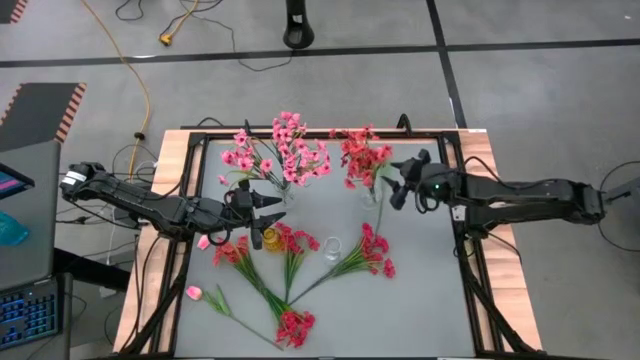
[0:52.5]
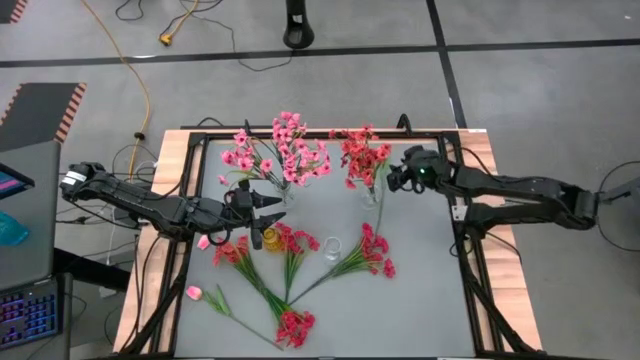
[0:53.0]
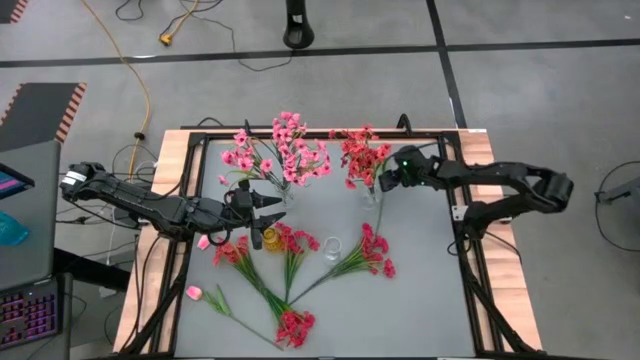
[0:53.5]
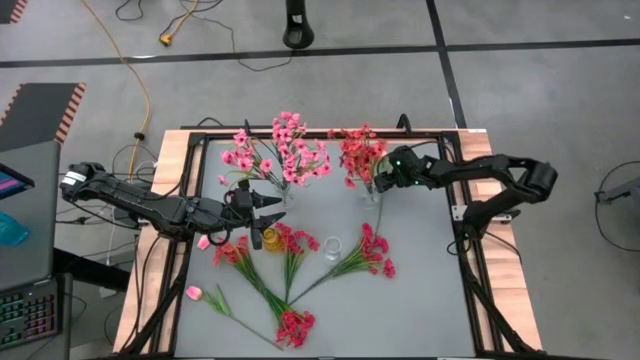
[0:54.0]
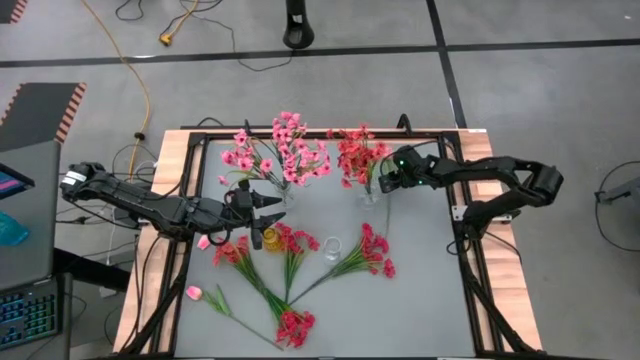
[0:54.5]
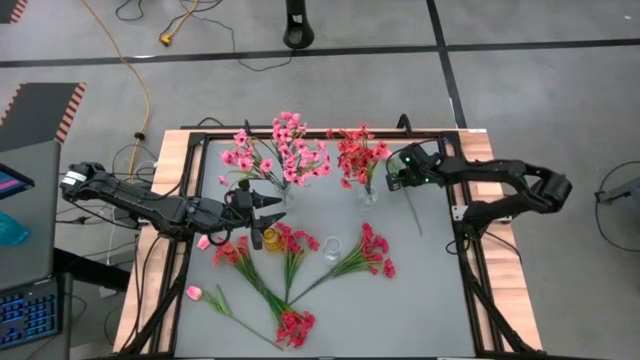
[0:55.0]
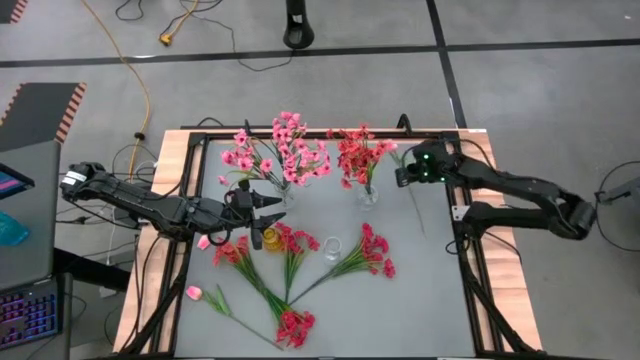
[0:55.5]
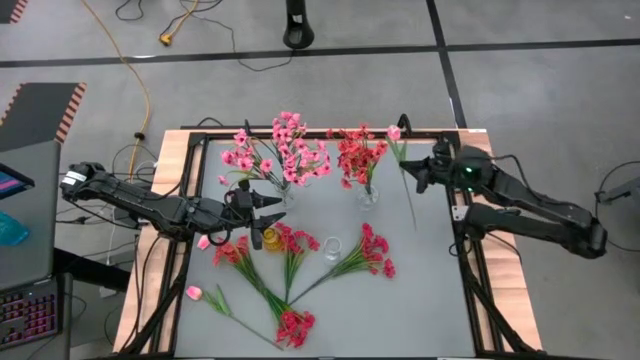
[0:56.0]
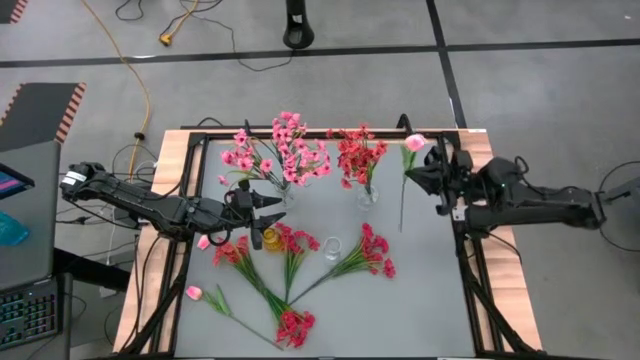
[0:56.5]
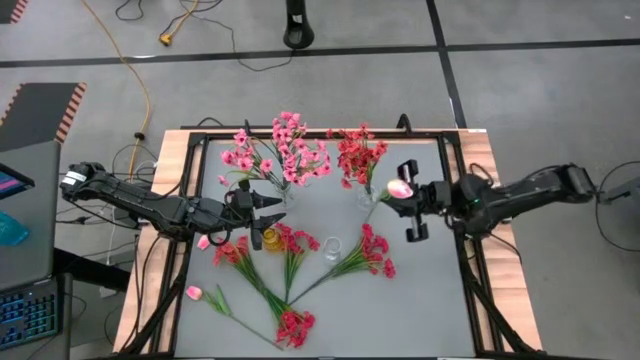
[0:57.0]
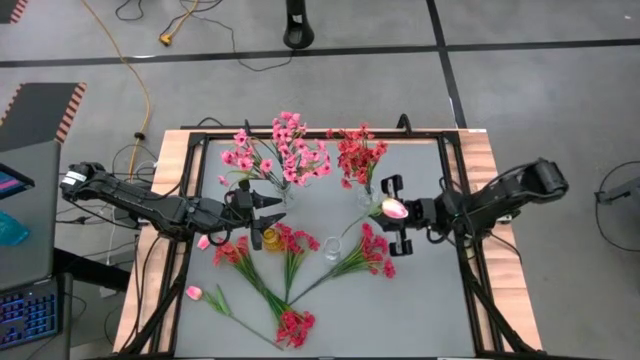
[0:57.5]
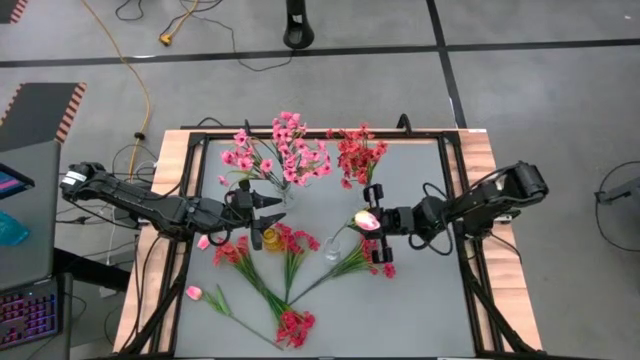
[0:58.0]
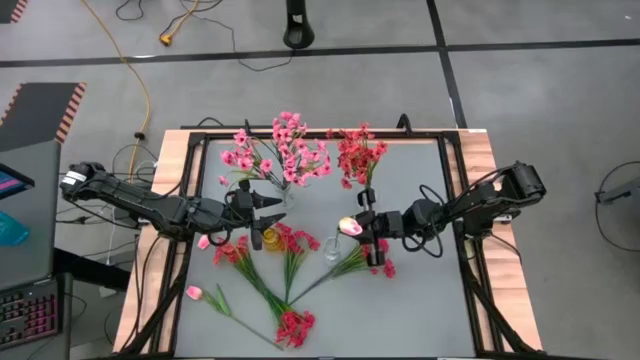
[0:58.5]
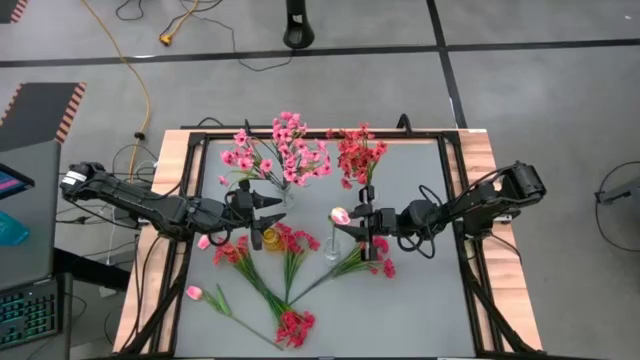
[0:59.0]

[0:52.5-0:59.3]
Task: Sort flowers into vase by color
Put the top light pink flower into the bottom transparent vase

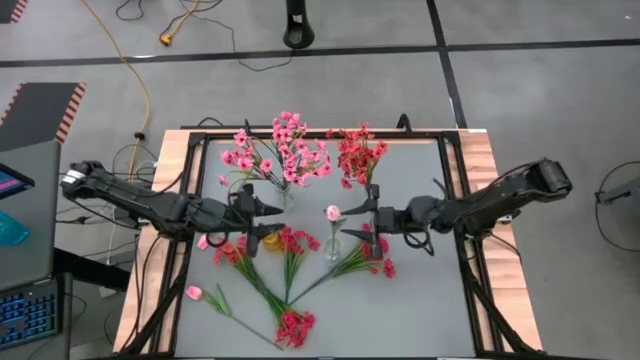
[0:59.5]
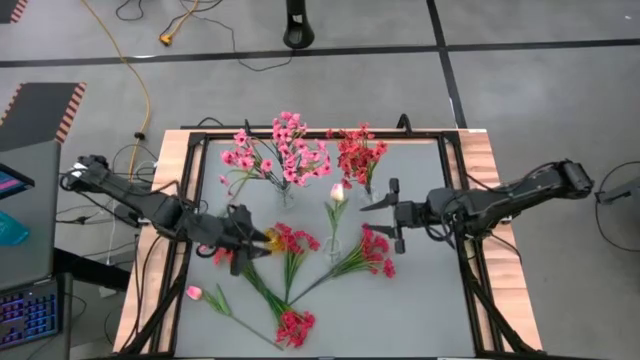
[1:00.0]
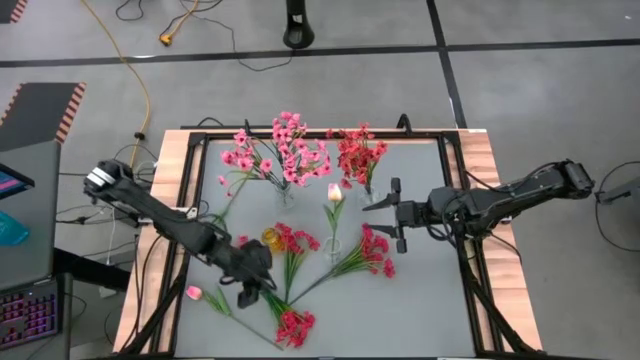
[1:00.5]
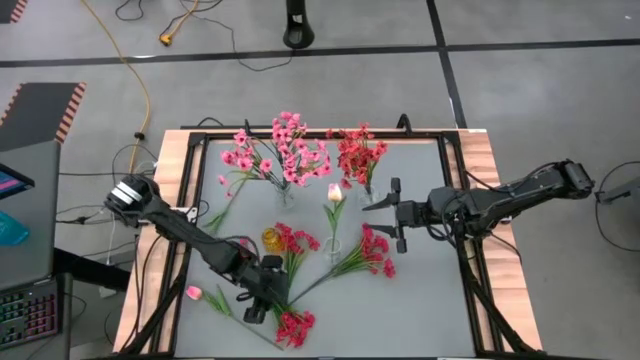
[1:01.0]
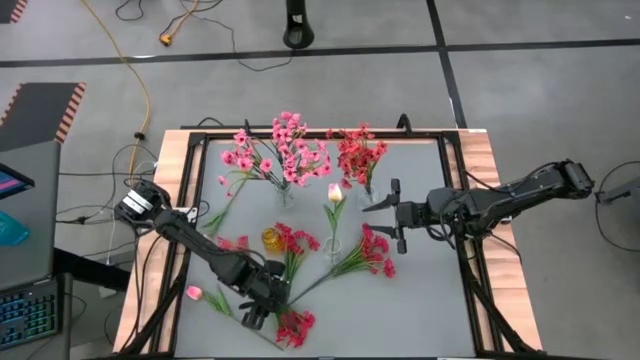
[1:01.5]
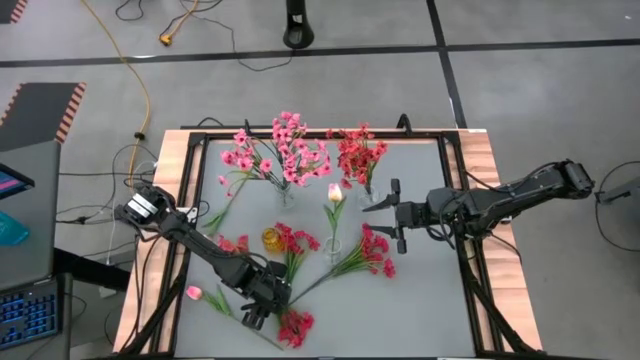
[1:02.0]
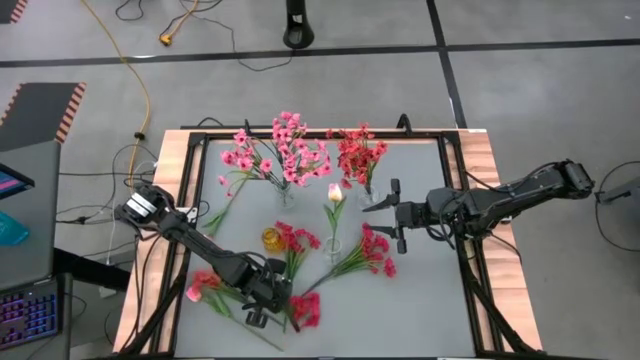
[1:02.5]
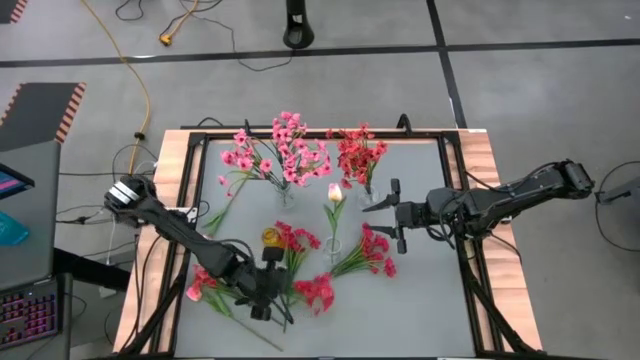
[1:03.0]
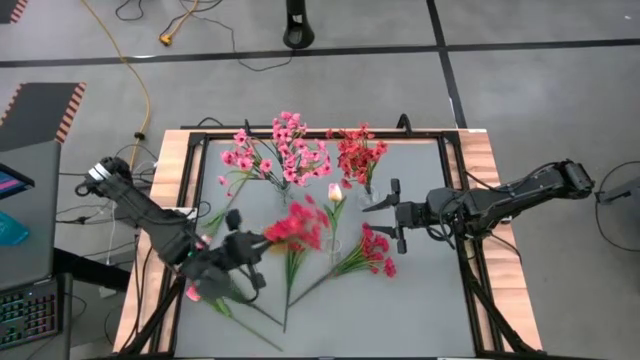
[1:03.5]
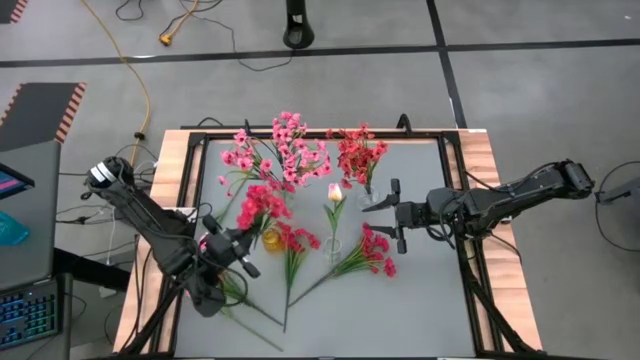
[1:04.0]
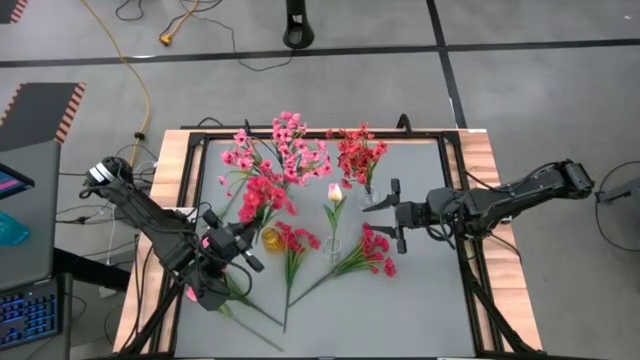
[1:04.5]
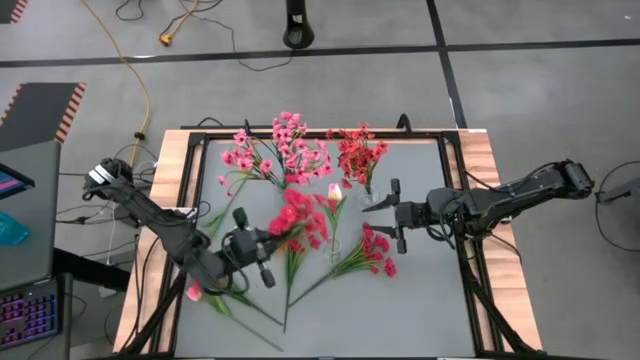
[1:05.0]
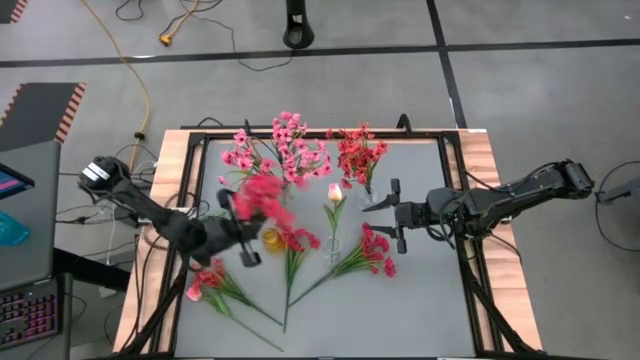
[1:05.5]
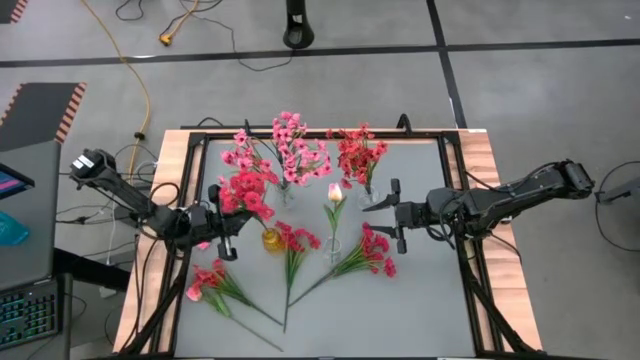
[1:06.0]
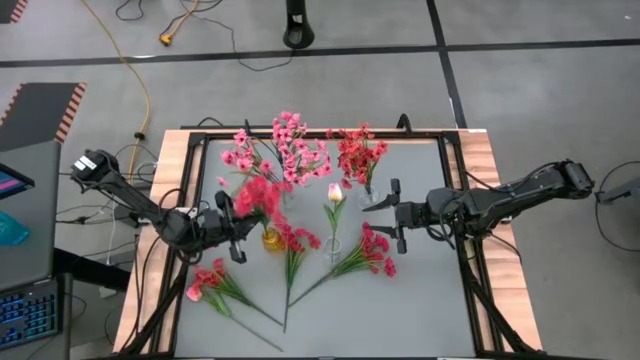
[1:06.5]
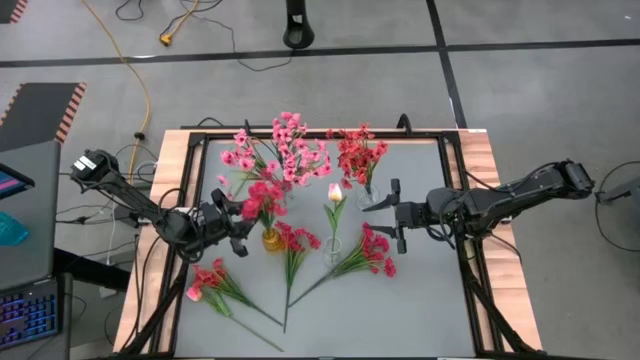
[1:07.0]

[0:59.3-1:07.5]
Put the bottom left red flowers into the yellow vase

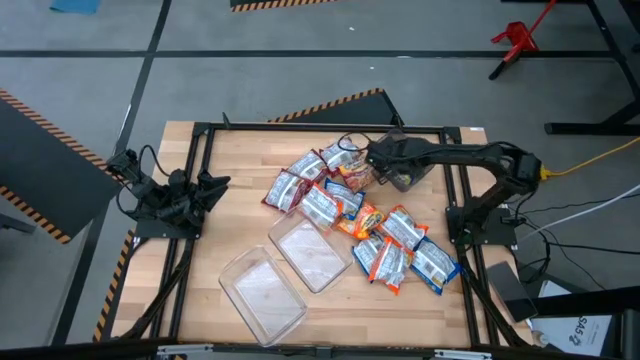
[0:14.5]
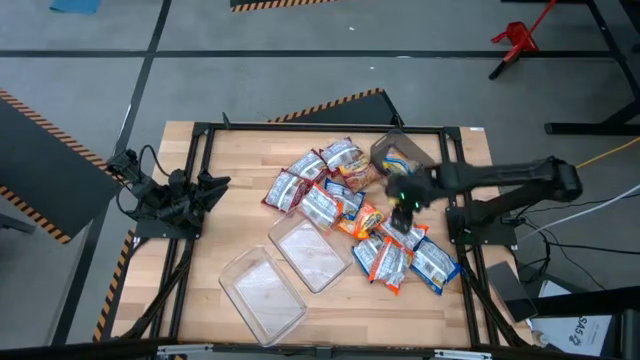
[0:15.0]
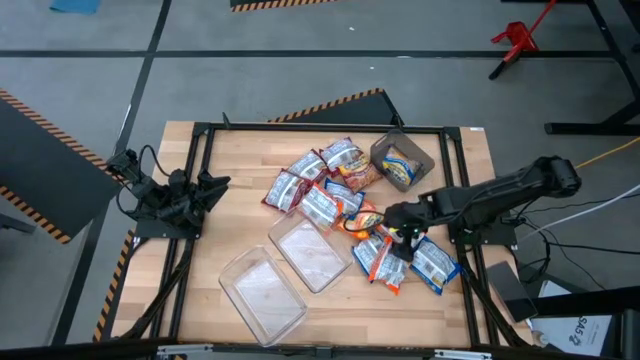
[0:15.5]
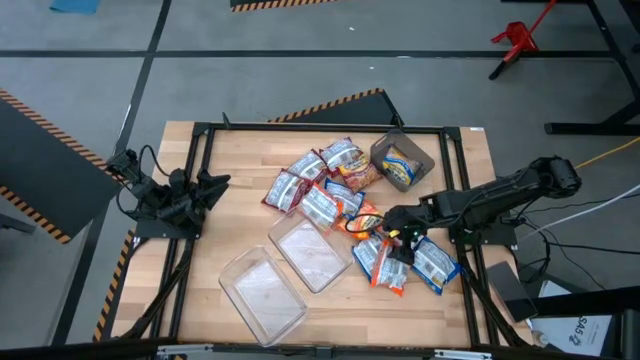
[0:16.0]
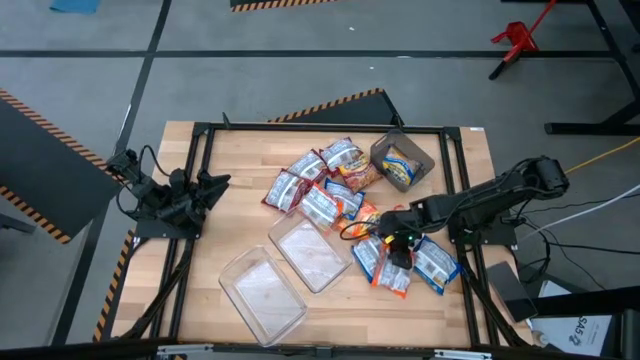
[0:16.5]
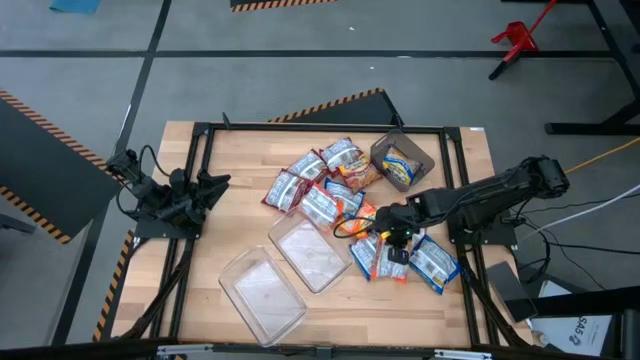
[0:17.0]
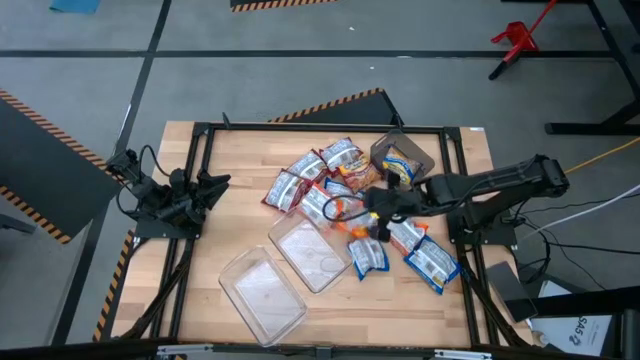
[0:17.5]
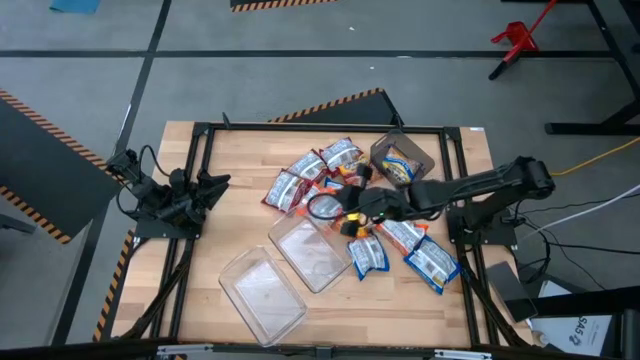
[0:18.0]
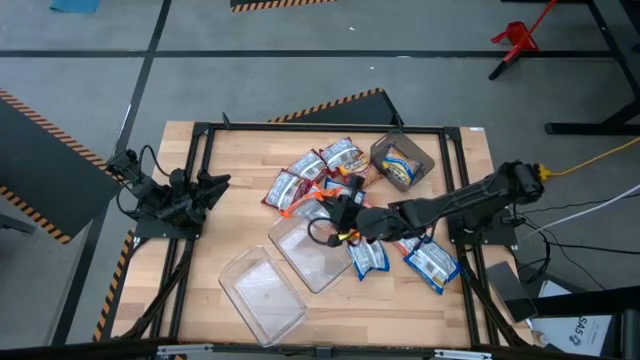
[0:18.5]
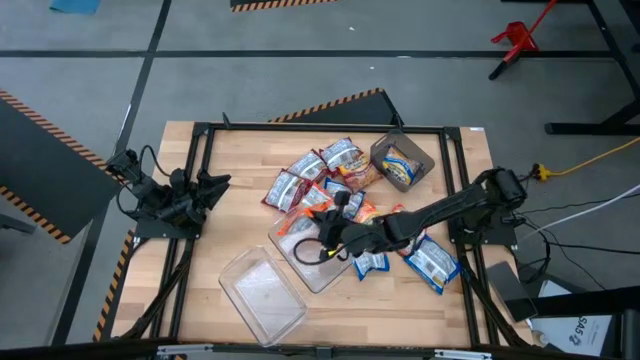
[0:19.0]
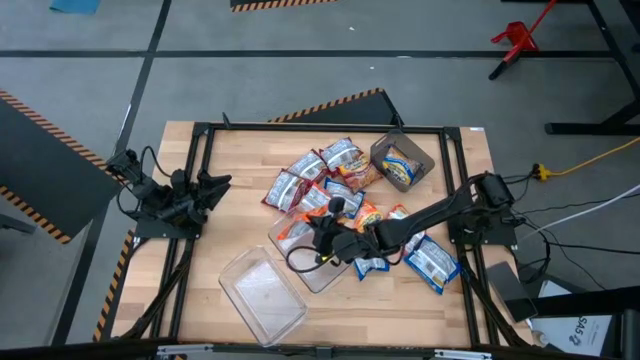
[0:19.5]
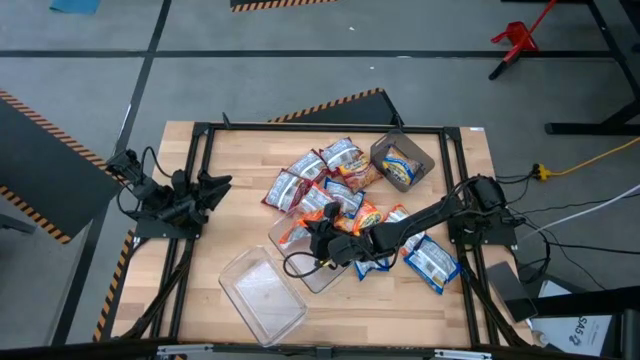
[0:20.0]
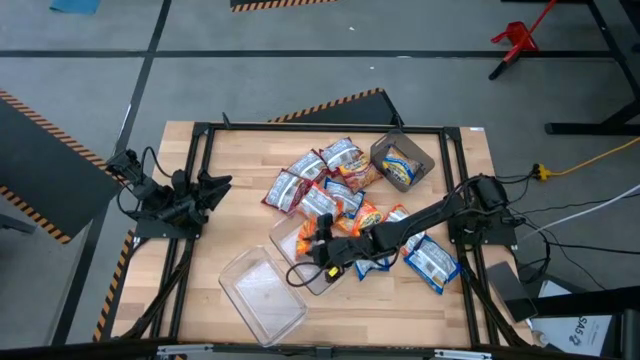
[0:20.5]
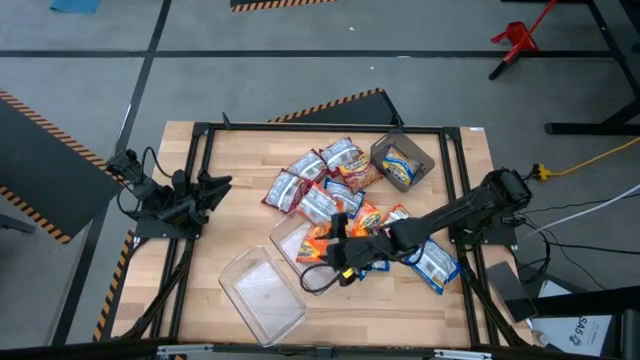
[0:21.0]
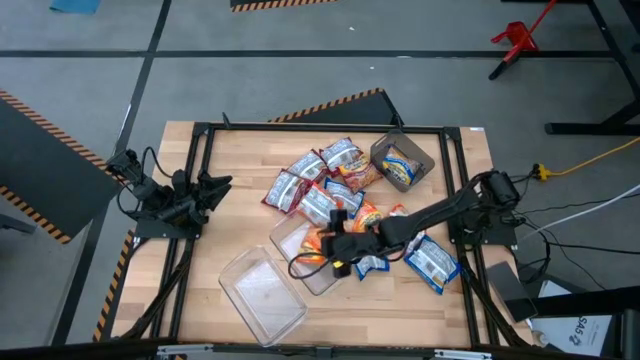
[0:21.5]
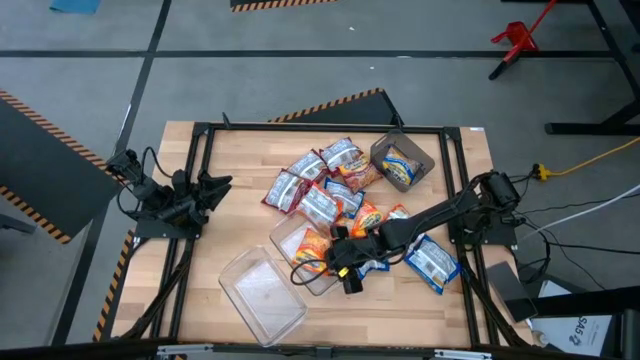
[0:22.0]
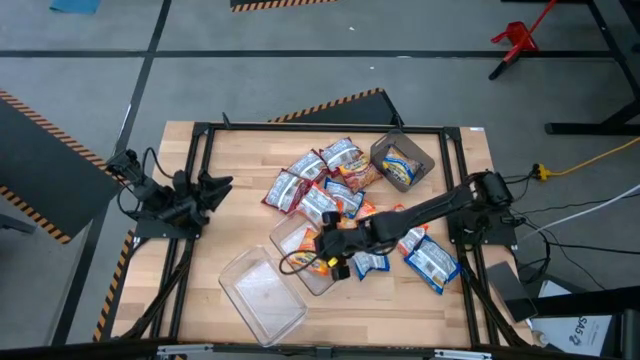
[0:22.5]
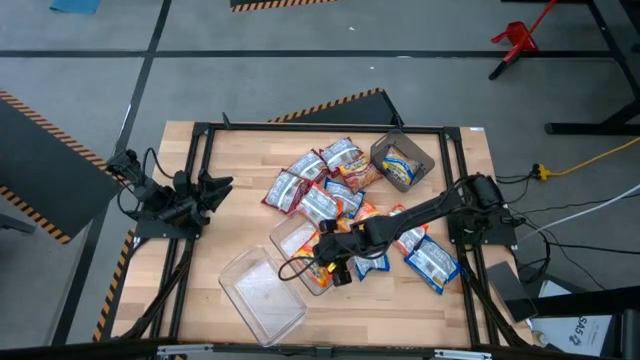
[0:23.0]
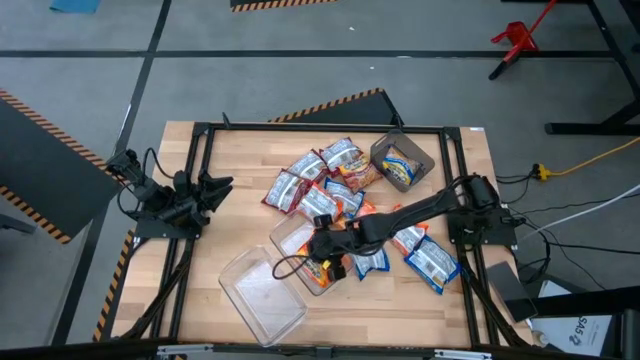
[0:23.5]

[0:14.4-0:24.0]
Task: Sort Maruchan noodles
Put the orange noodle pack into the top transparent bin
